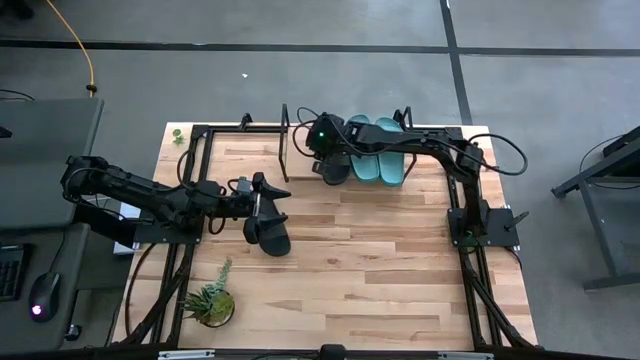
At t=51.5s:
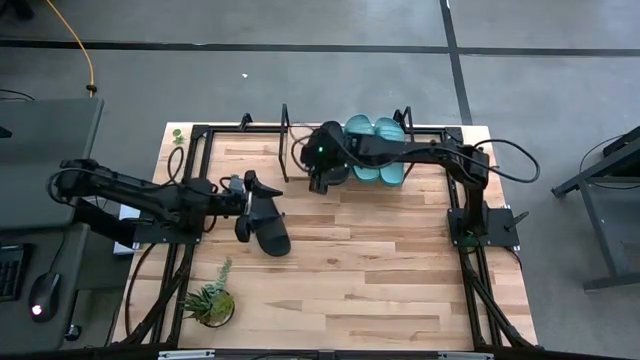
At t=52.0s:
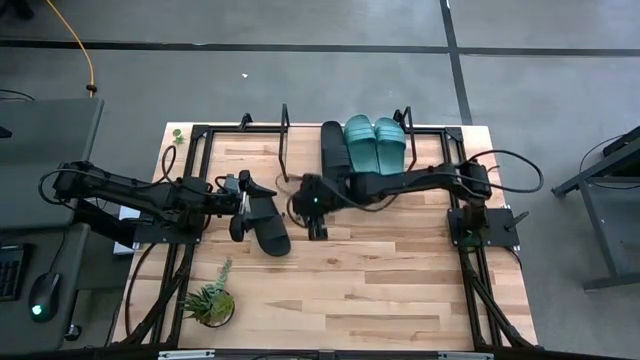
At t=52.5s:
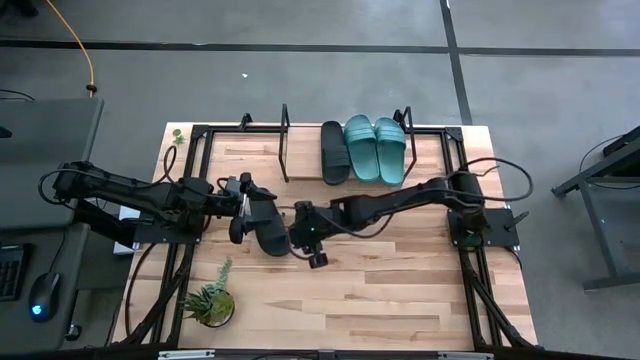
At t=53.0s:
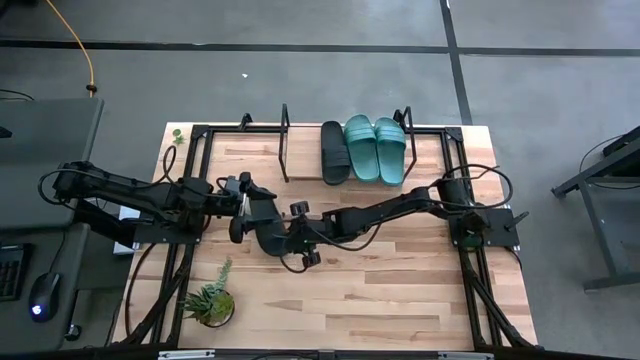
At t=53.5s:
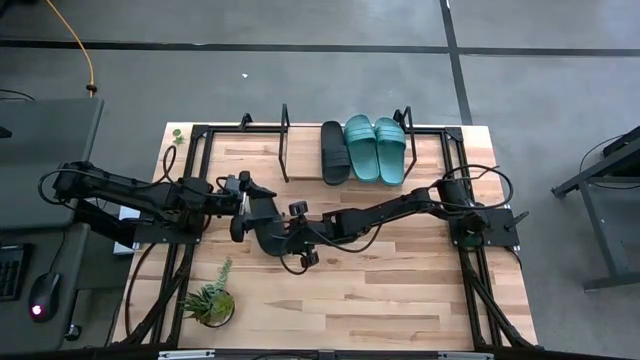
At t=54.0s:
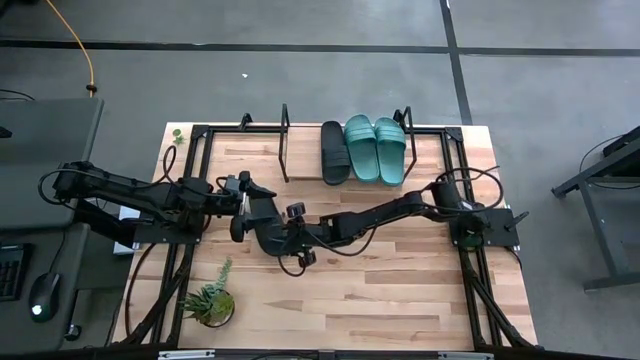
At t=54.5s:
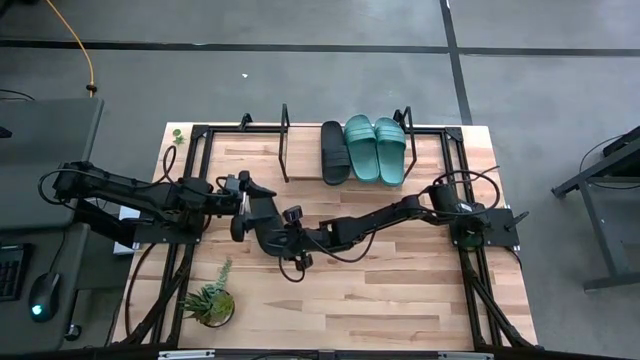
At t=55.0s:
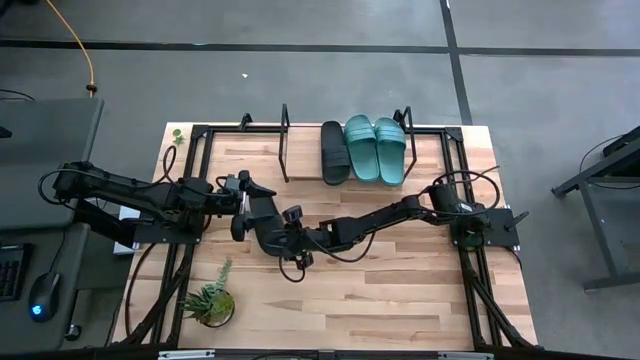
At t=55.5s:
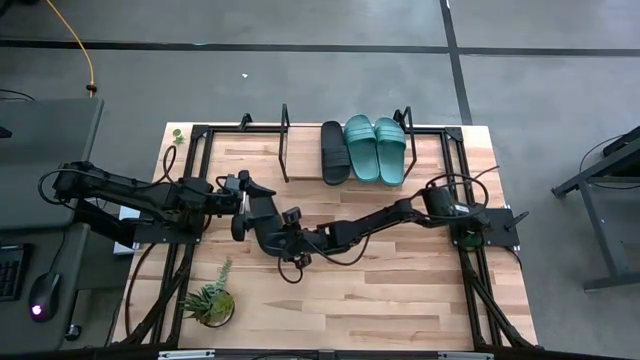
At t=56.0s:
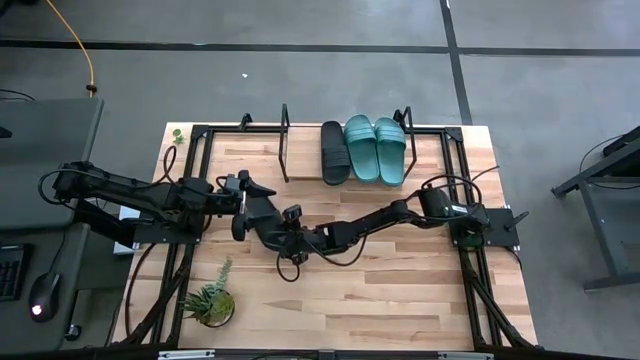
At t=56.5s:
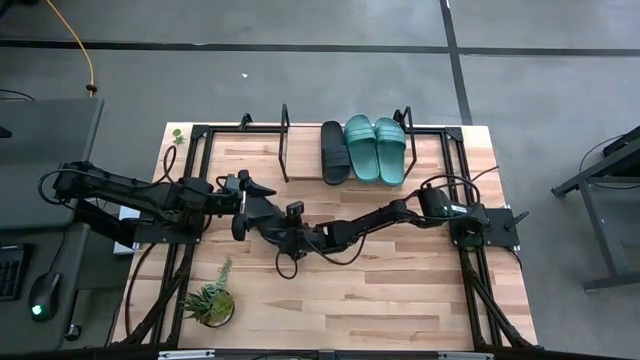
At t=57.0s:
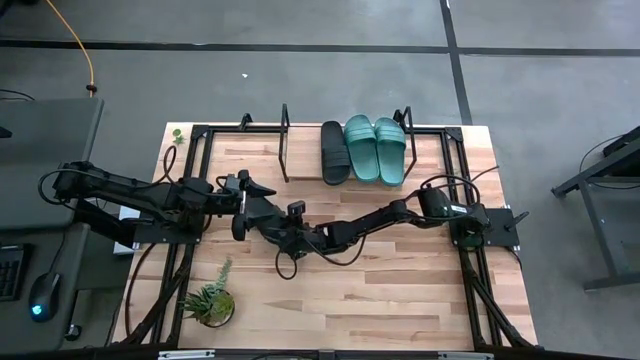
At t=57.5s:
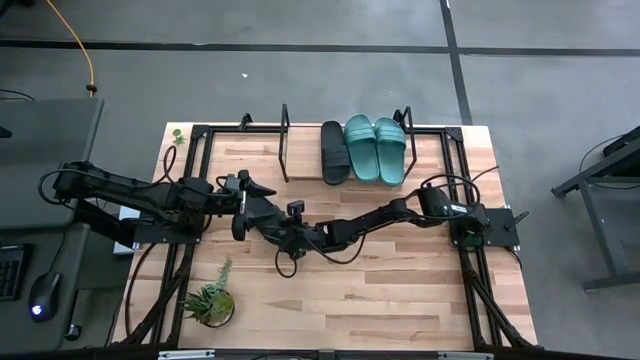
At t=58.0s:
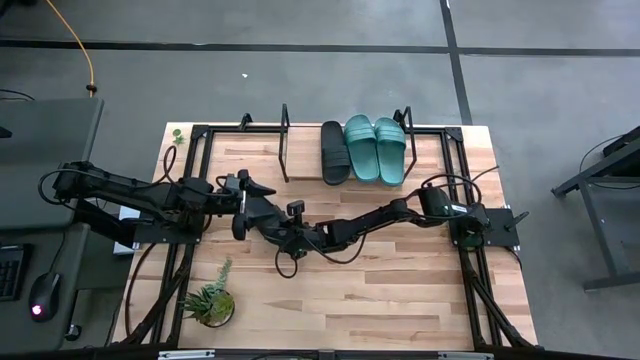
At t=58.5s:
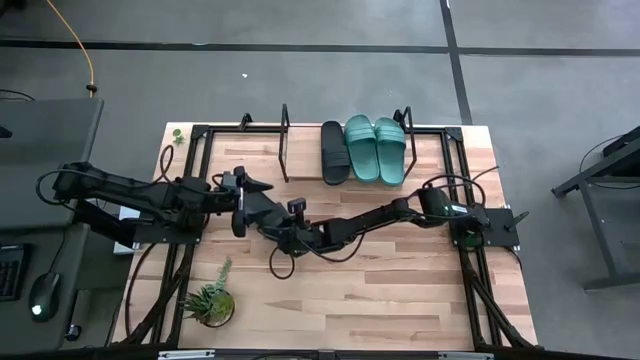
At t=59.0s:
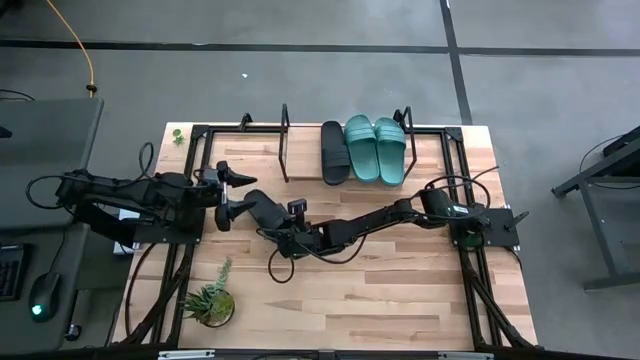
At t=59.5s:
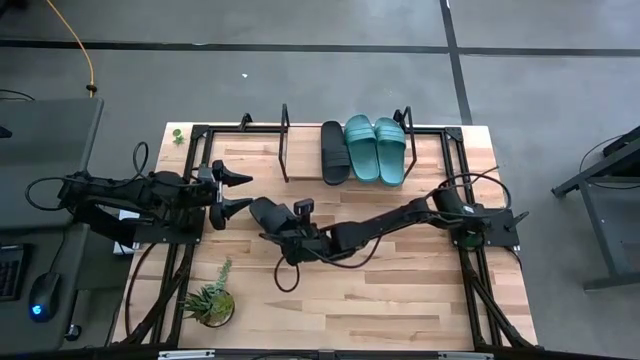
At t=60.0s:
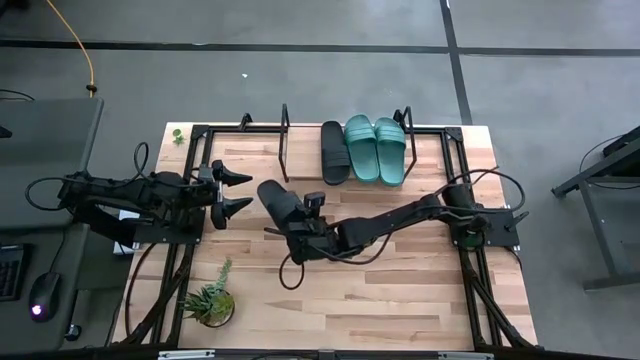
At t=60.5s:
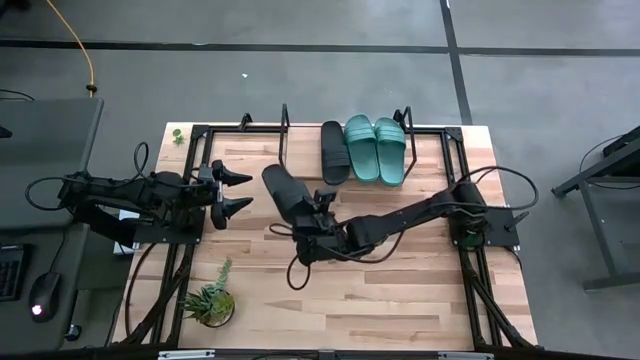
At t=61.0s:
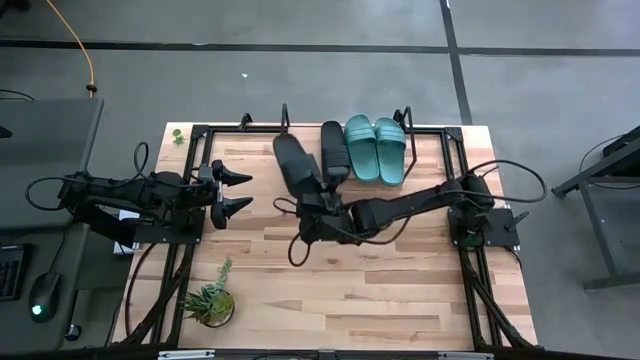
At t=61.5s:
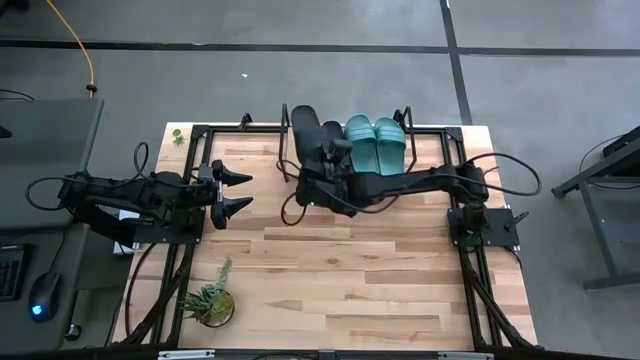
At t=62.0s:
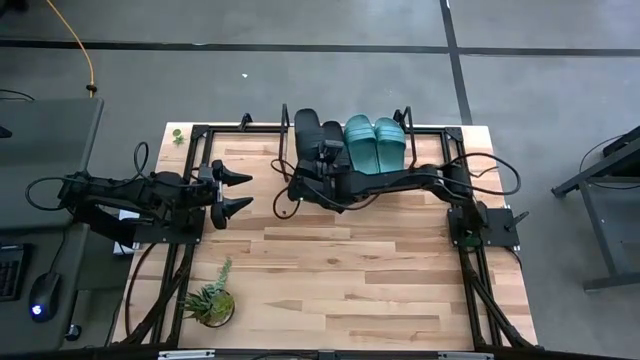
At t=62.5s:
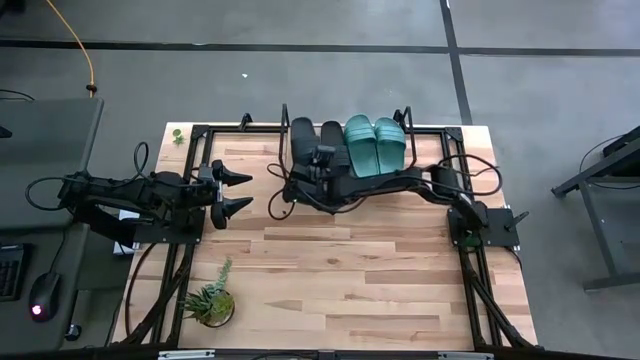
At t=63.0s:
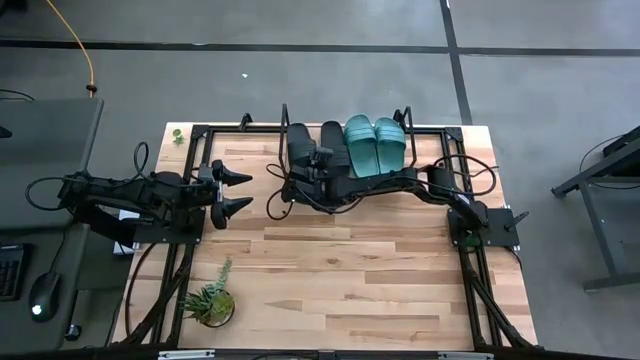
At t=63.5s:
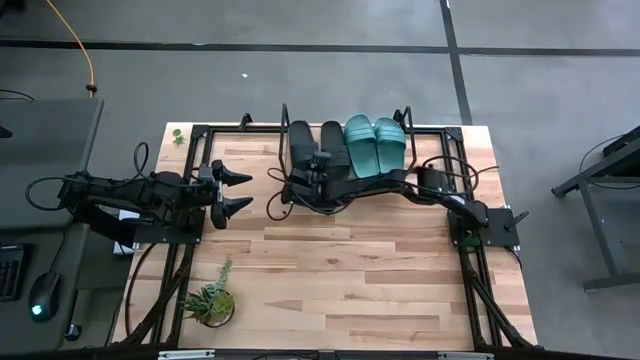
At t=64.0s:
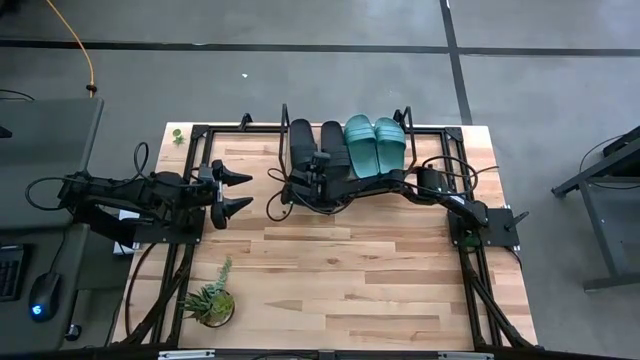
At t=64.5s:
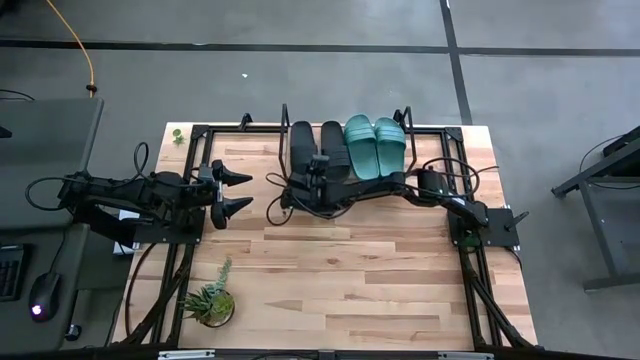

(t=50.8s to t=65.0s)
Task: Pick and place slides into the shelf
Put the black slide on the shelf

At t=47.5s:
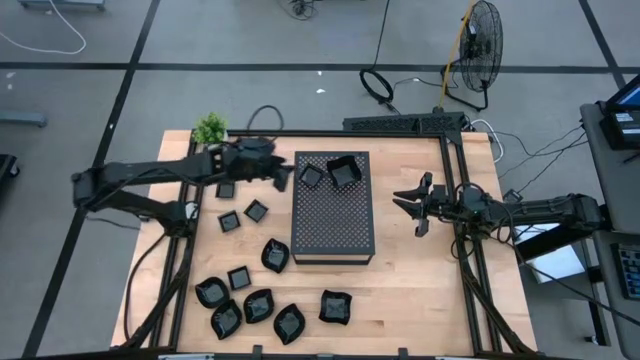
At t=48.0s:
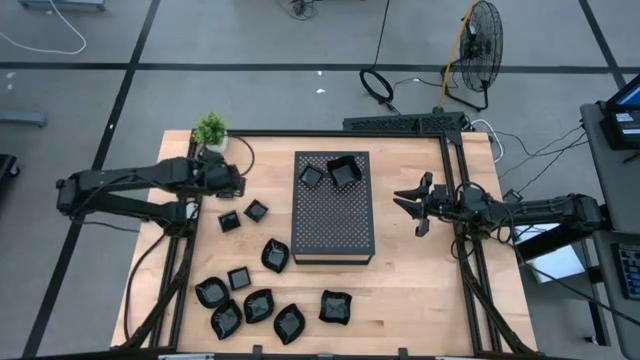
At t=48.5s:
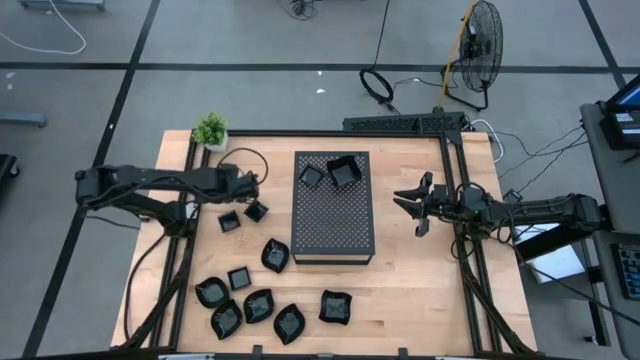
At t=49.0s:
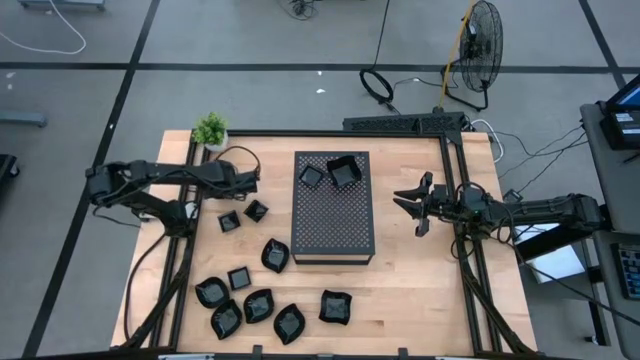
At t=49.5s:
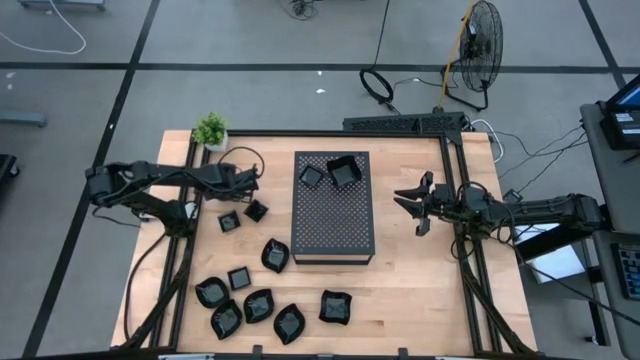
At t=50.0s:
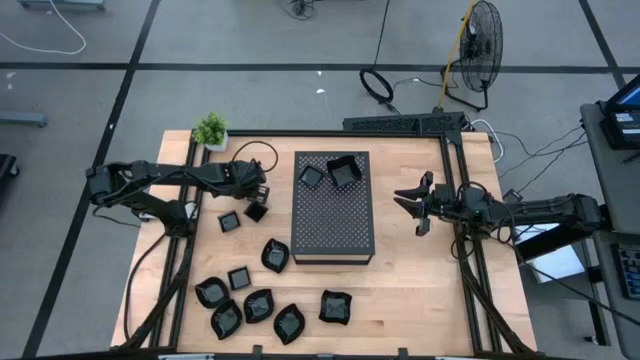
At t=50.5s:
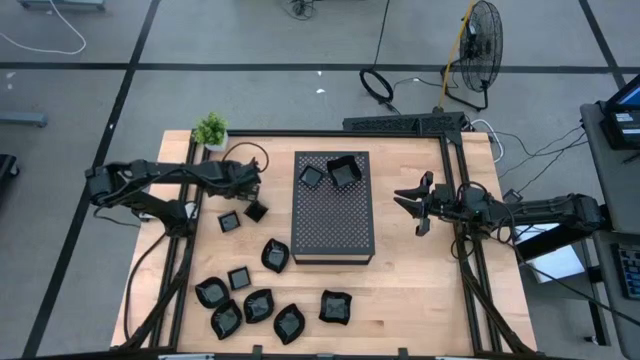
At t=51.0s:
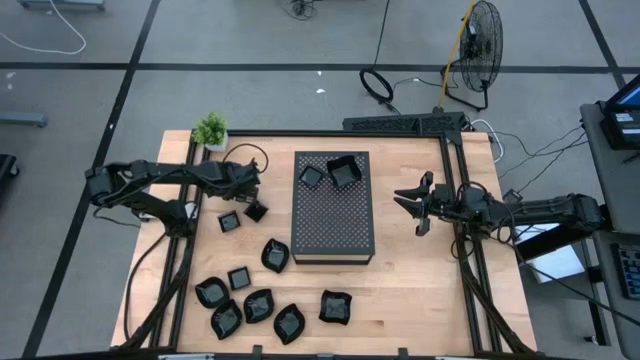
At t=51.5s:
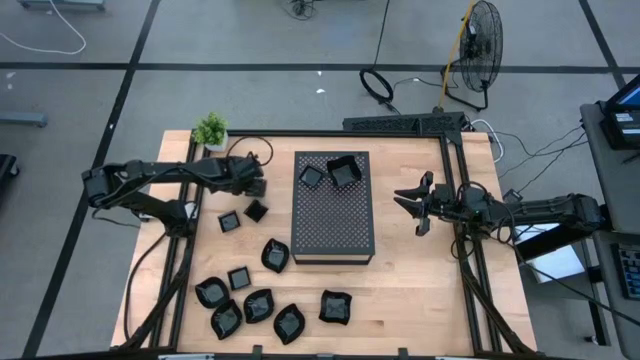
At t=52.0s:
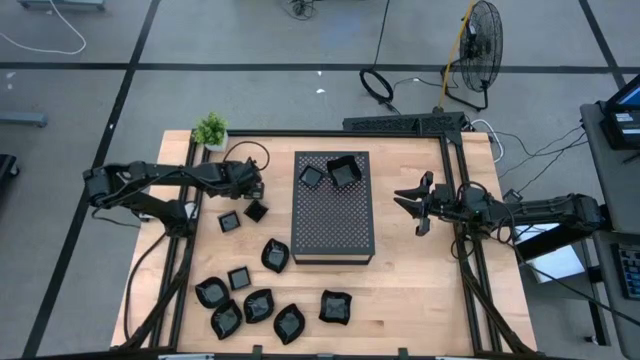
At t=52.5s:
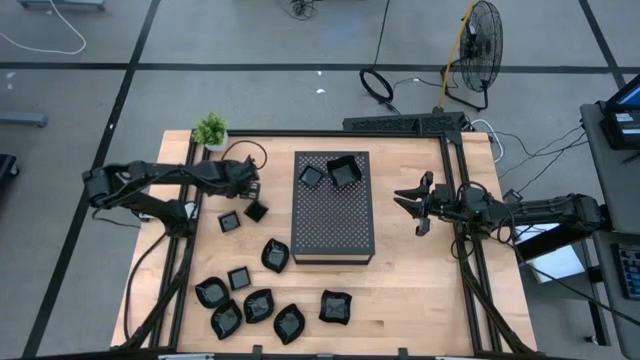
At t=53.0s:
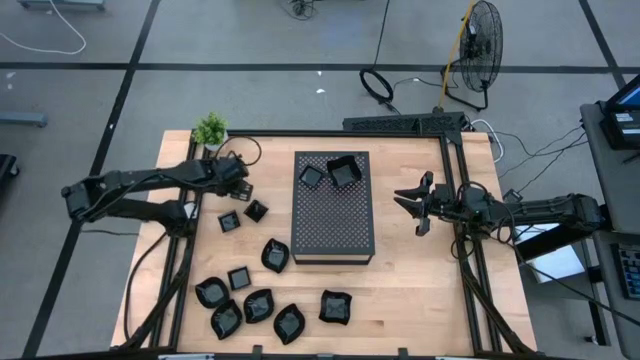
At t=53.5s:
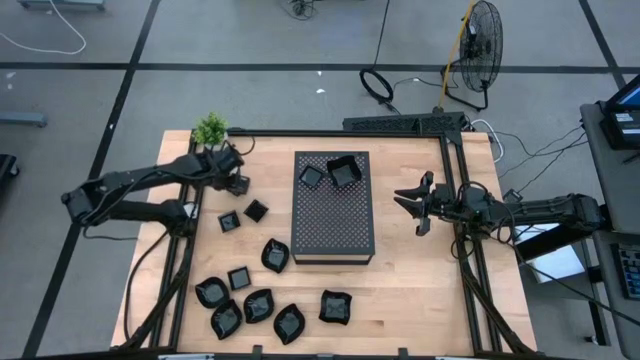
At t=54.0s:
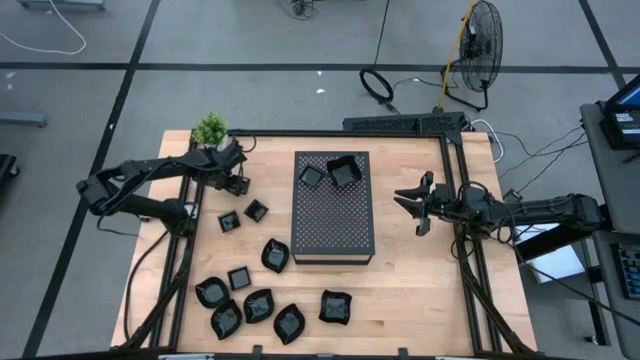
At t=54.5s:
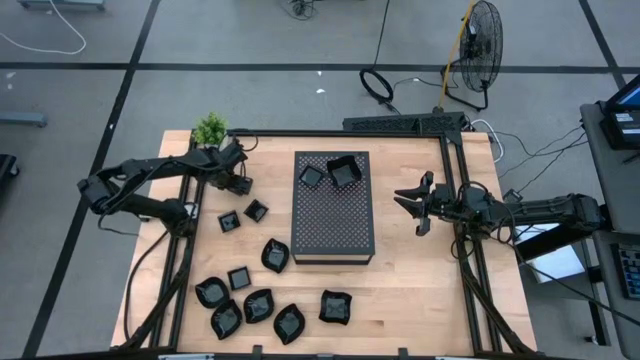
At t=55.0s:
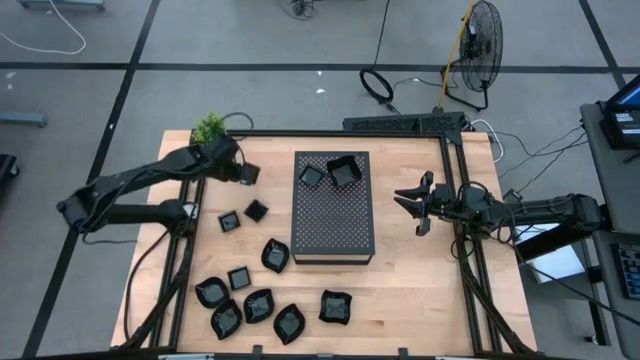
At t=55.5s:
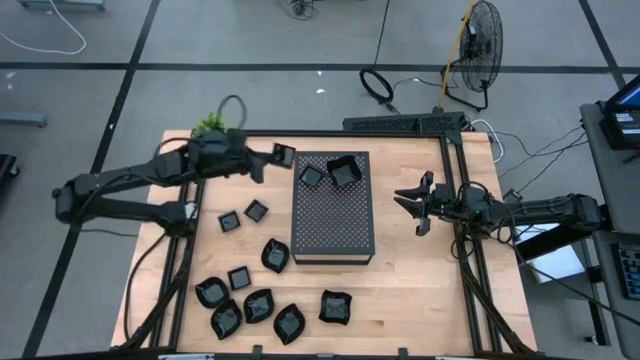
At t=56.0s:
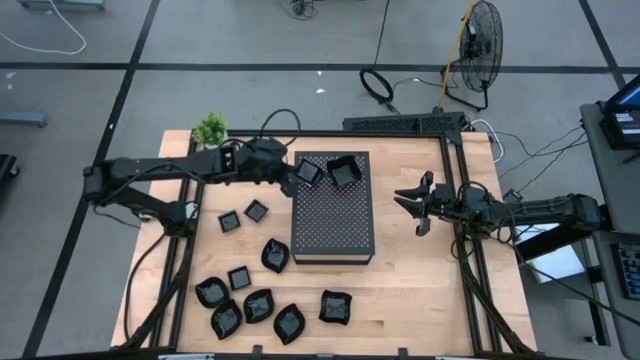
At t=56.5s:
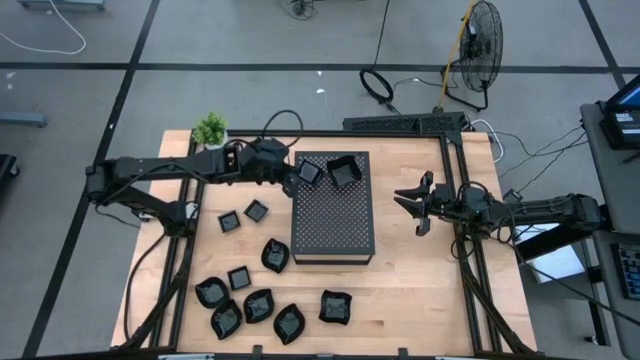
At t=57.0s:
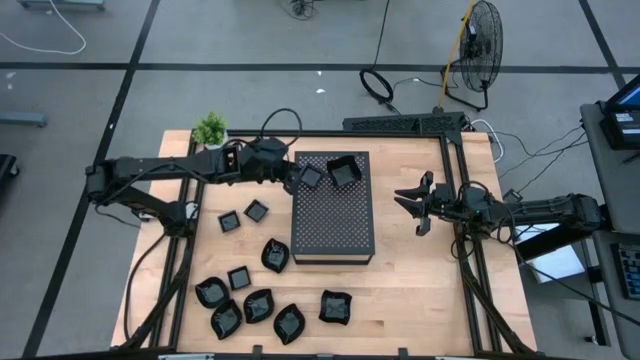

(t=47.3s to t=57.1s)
Task: Pick & Place Mini shaped plates
Stack the black square plate on top of the black square plate on the shelf
